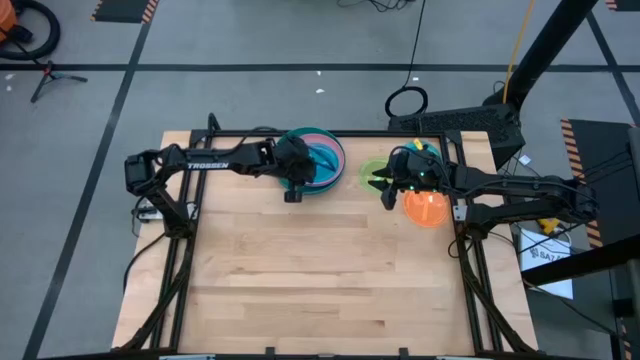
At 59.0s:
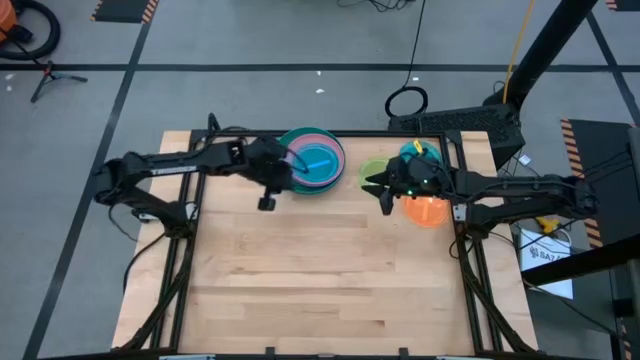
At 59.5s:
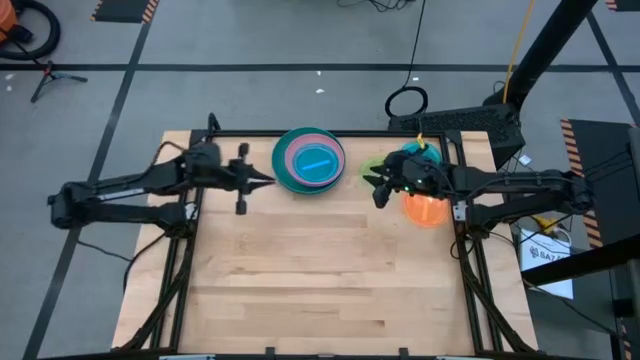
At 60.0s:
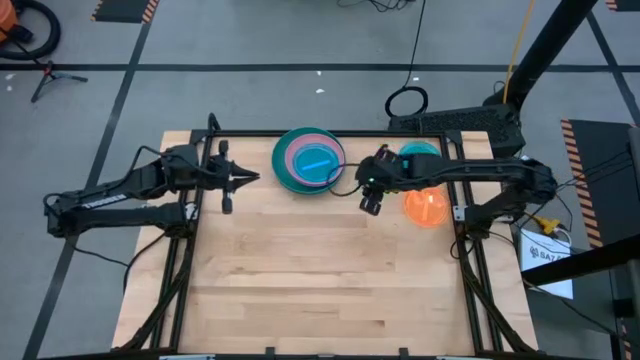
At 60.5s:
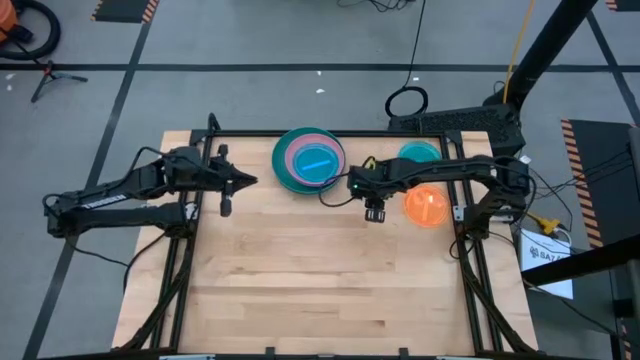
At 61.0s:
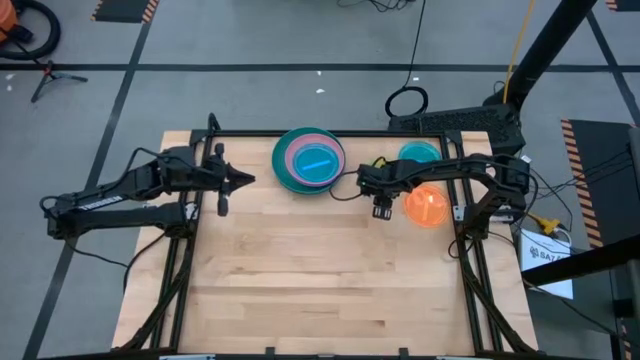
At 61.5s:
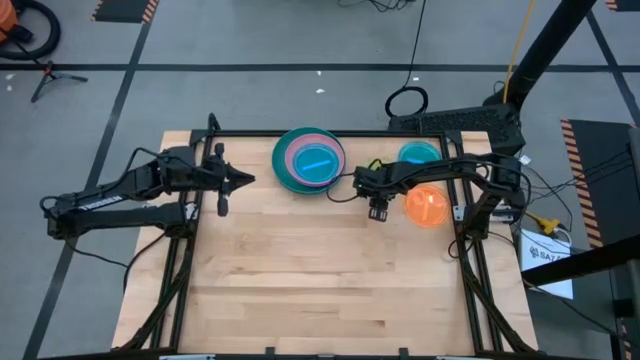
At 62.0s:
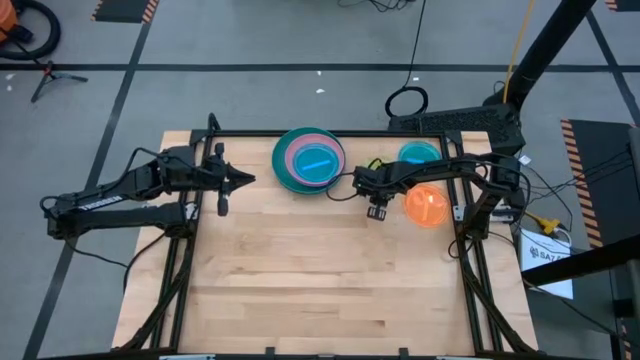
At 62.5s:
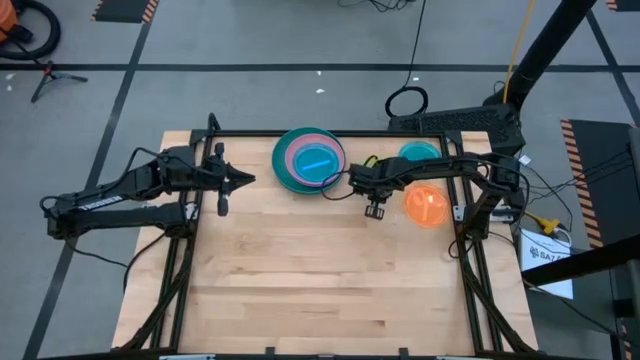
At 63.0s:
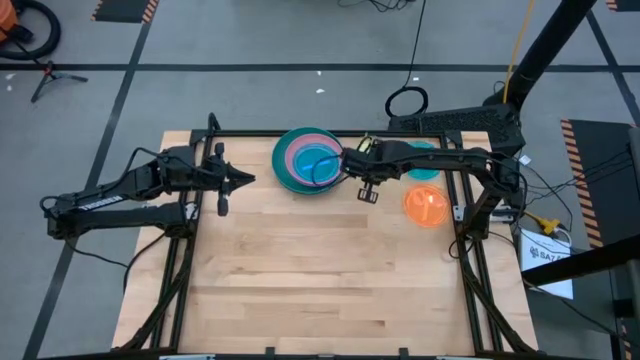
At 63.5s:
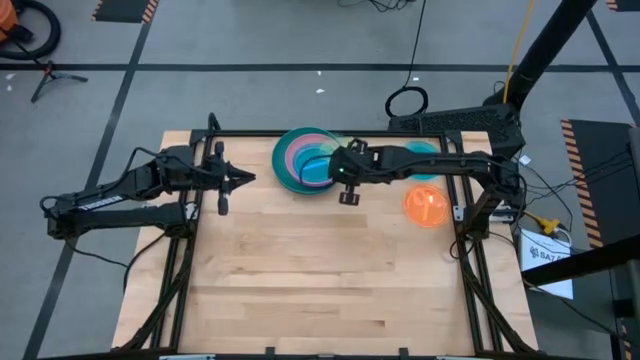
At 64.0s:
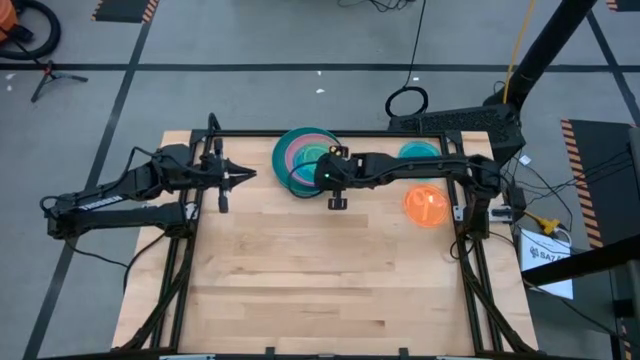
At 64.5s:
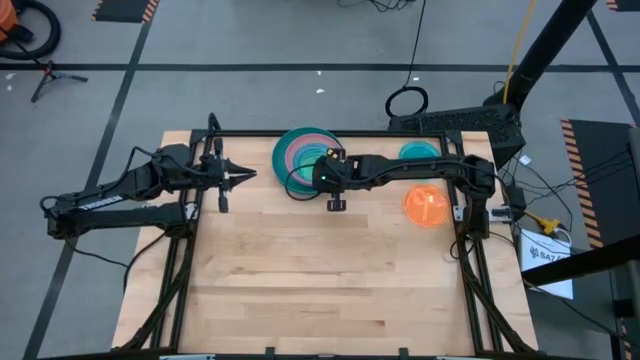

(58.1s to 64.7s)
Task: Stack plastic plates
Stack the green plate on top of the light blue plate

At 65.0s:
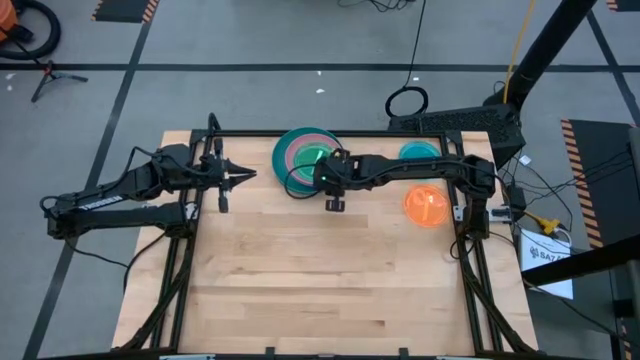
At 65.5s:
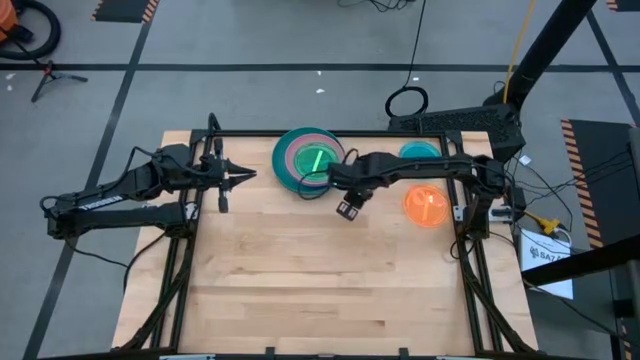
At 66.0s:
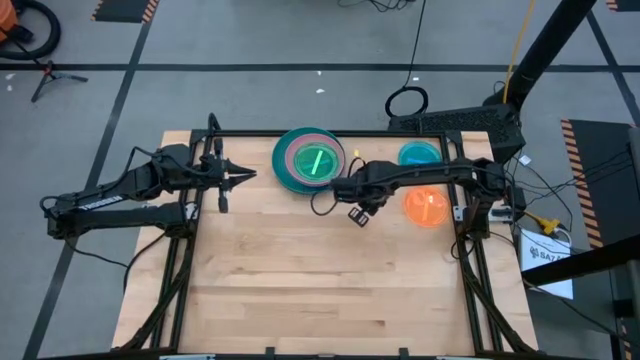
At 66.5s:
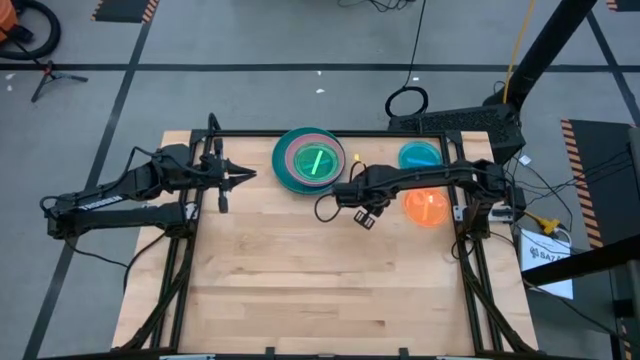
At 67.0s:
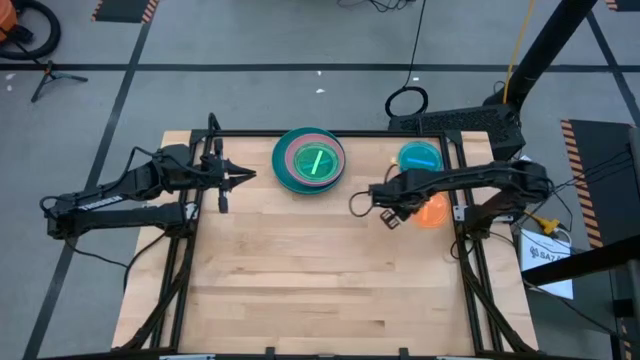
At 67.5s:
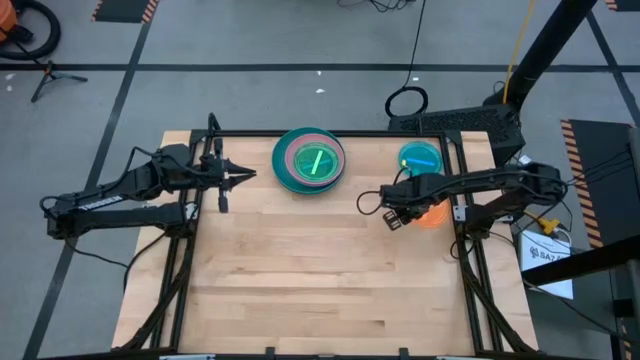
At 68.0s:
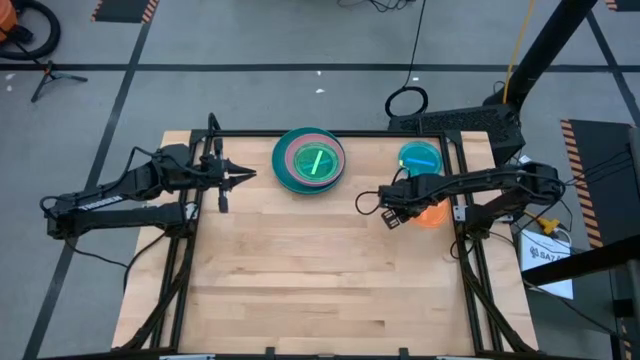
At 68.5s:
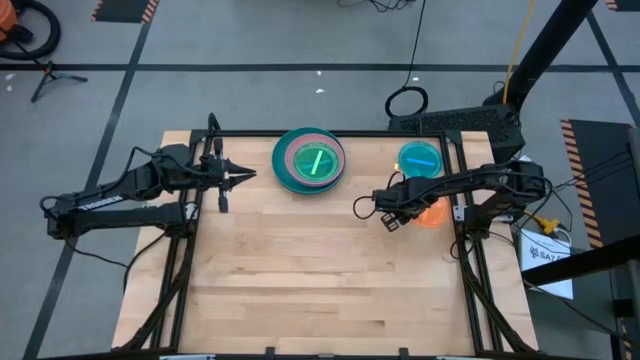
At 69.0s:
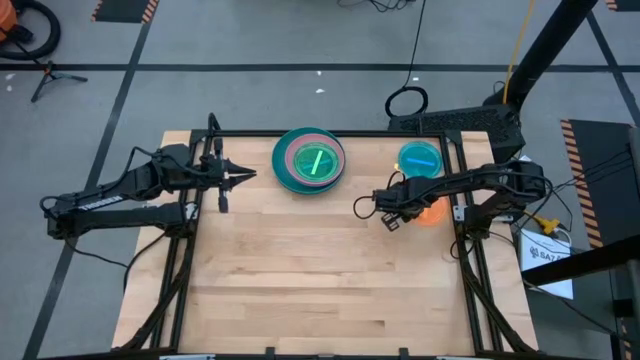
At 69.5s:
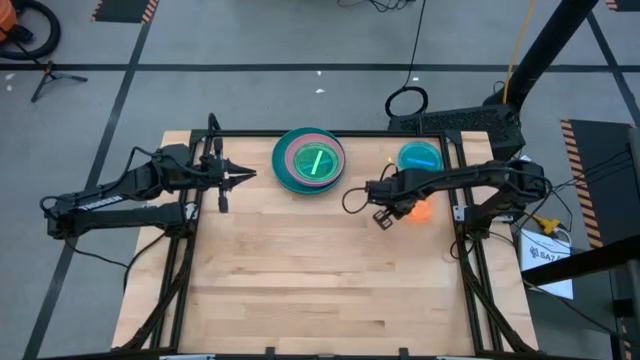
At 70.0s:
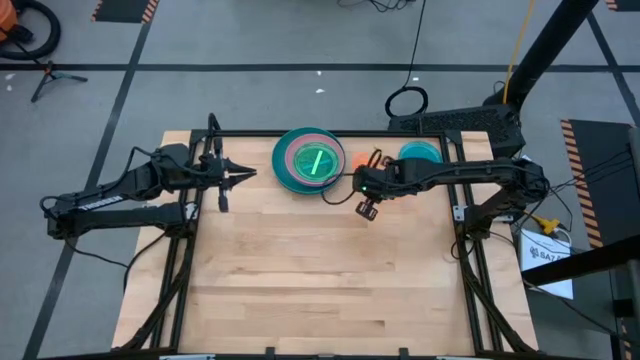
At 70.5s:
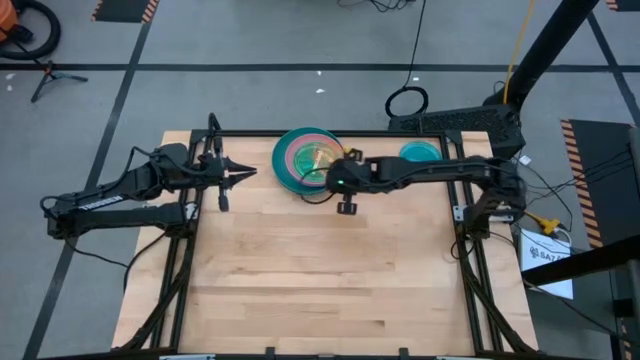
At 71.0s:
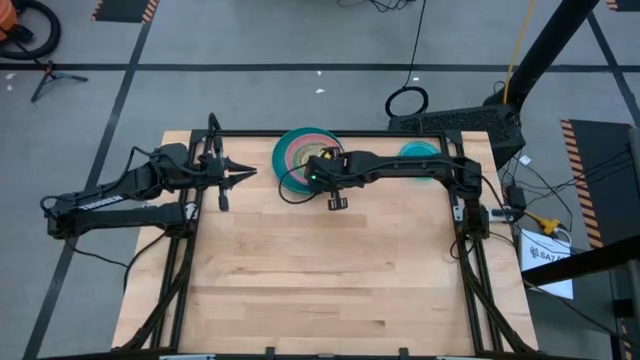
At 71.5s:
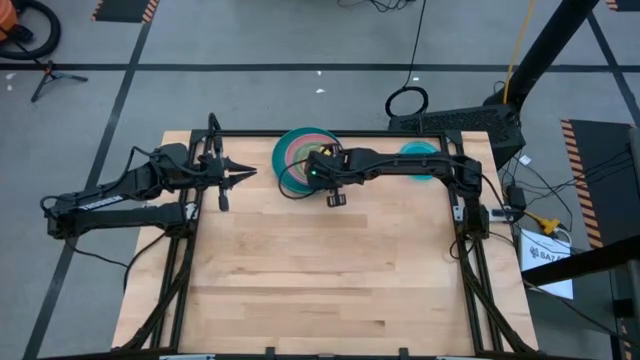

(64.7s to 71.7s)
Stack the orange plate on top of the green plate

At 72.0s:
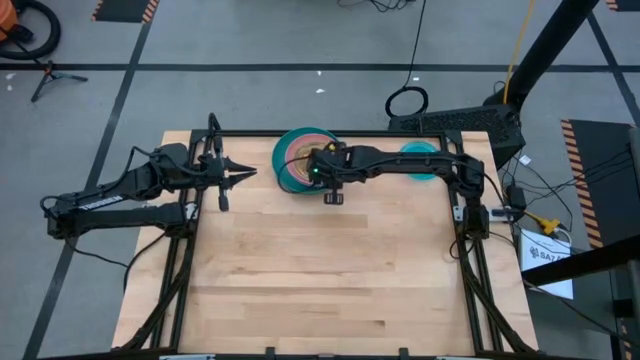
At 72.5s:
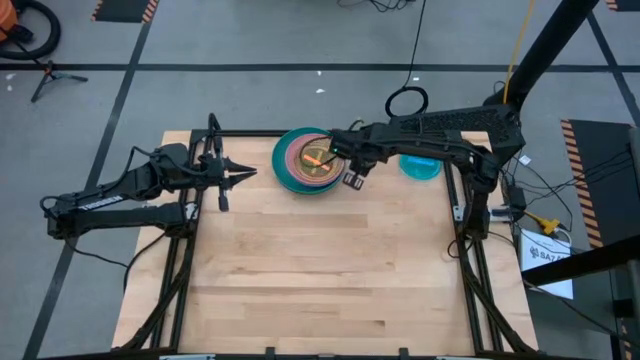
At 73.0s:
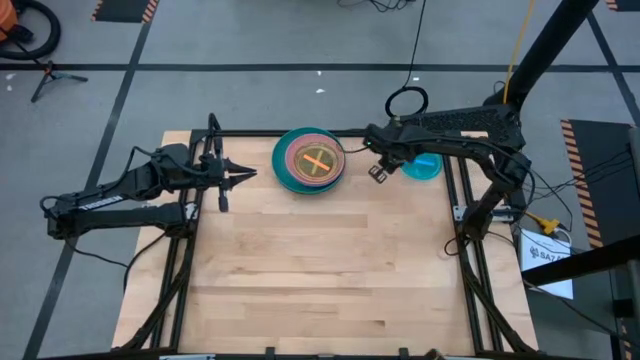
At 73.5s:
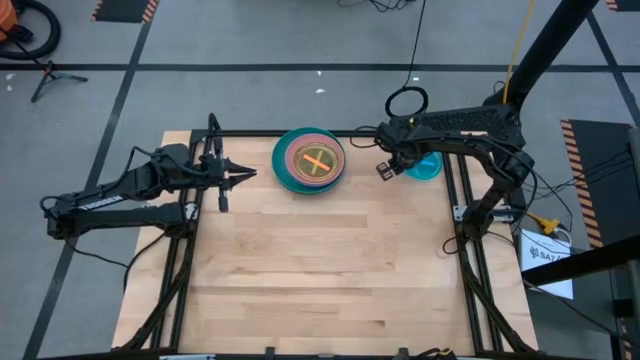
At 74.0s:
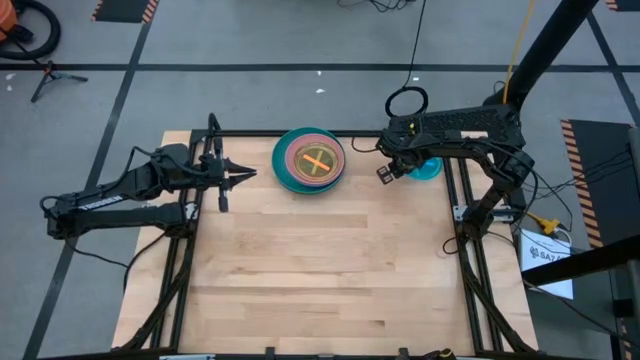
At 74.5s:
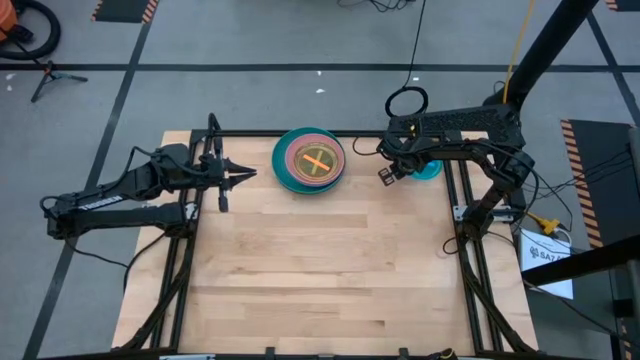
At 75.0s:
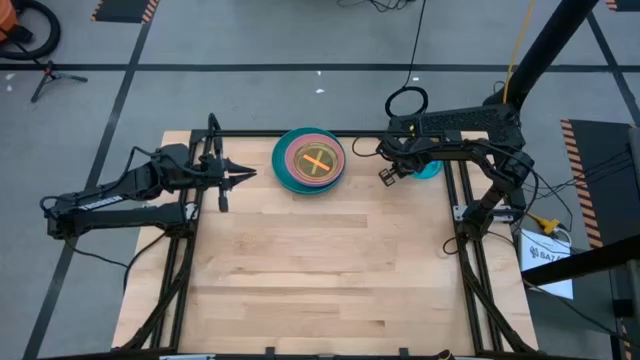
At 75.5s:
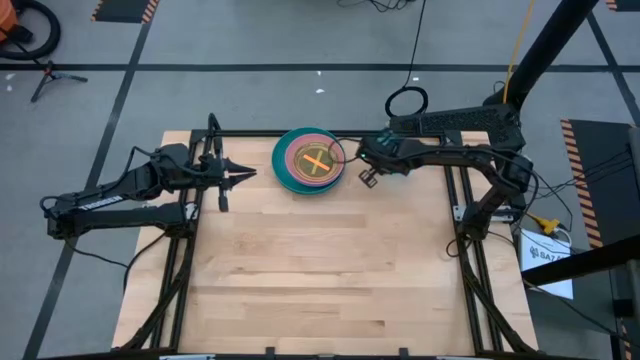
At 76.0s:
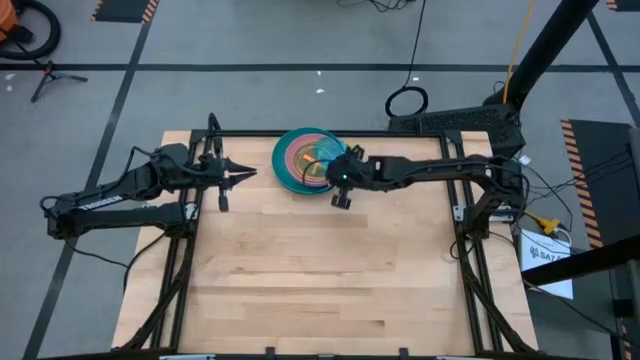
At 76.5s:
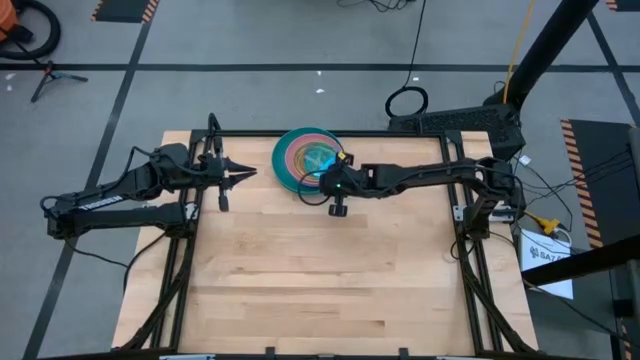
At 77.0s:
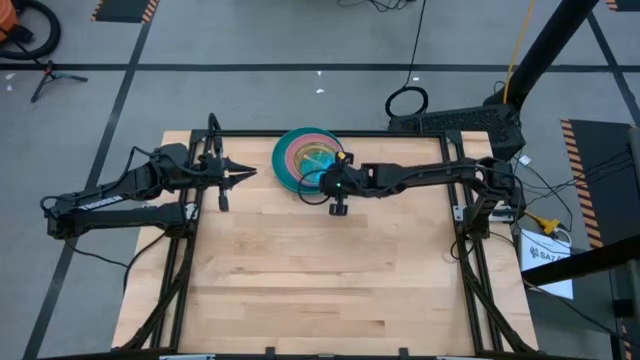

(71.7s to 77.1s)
Stack the light blue plate on top of the orange plate

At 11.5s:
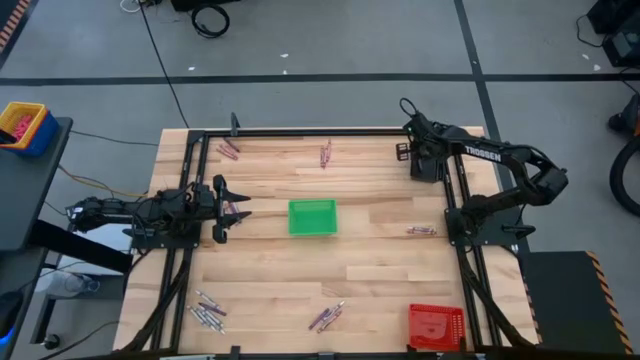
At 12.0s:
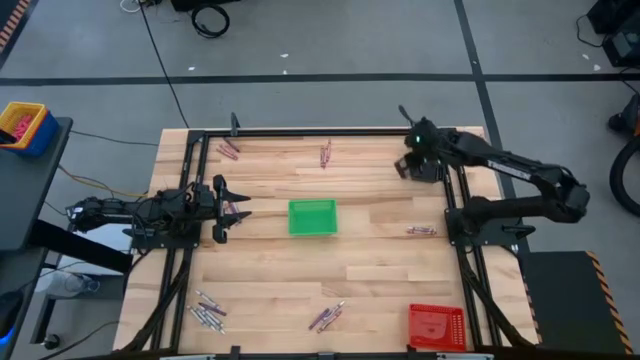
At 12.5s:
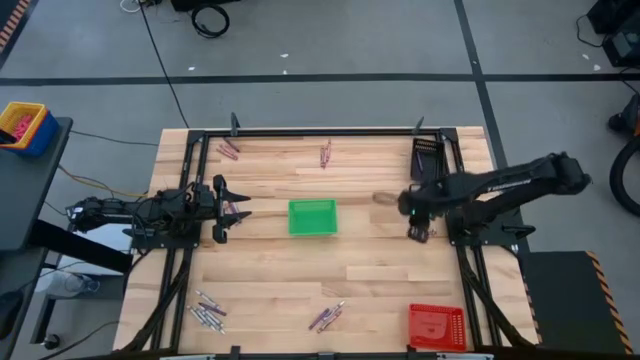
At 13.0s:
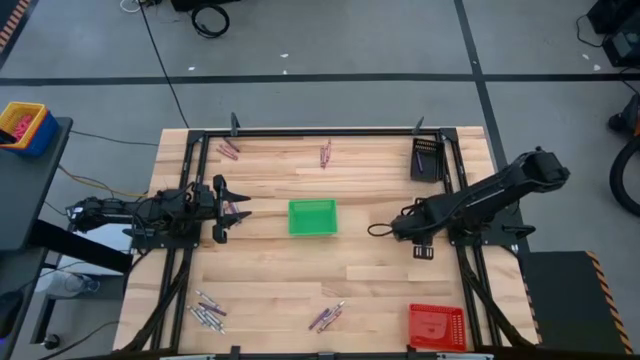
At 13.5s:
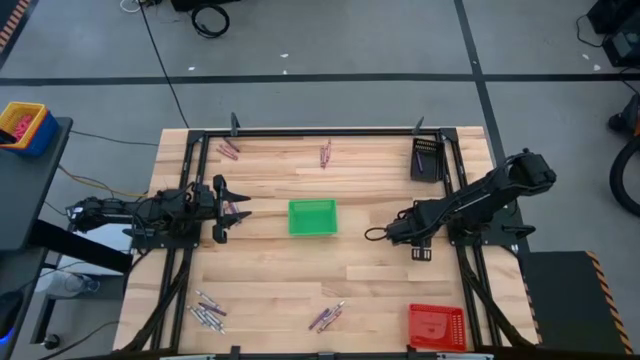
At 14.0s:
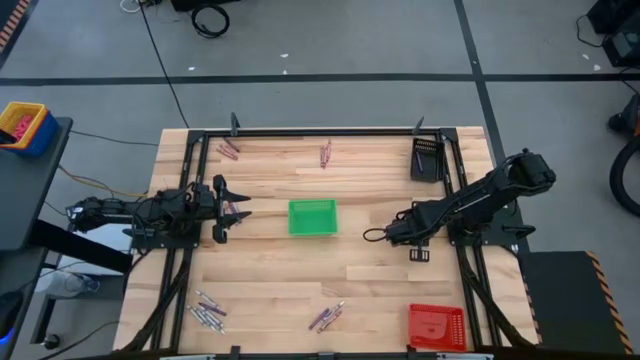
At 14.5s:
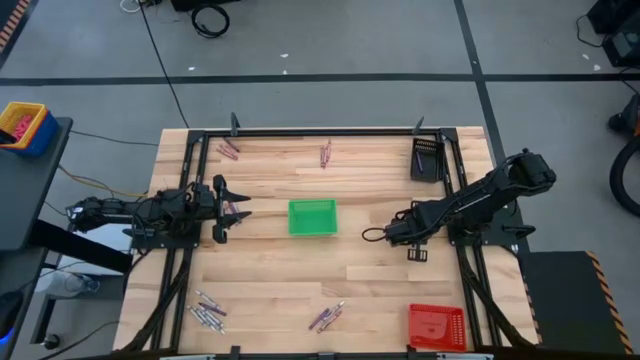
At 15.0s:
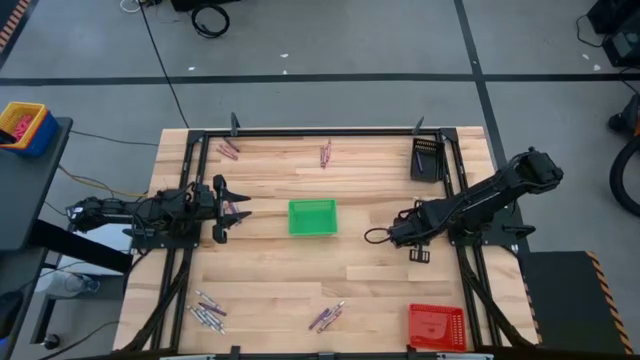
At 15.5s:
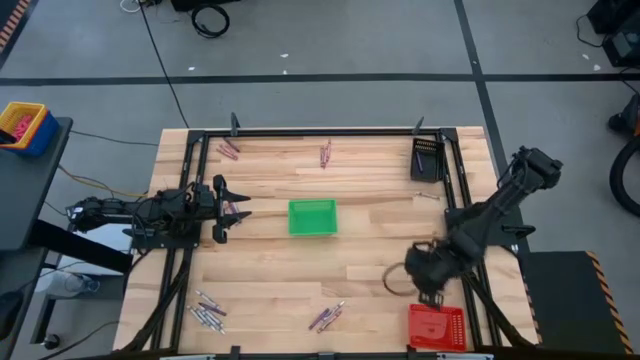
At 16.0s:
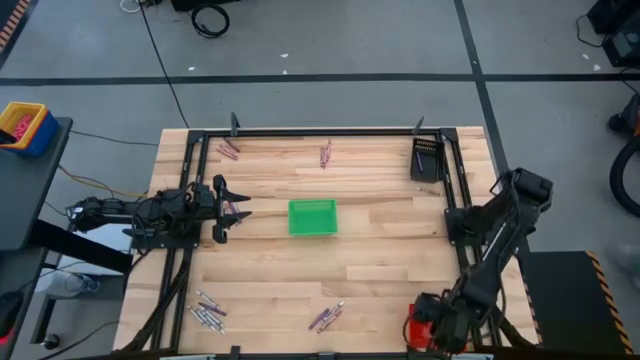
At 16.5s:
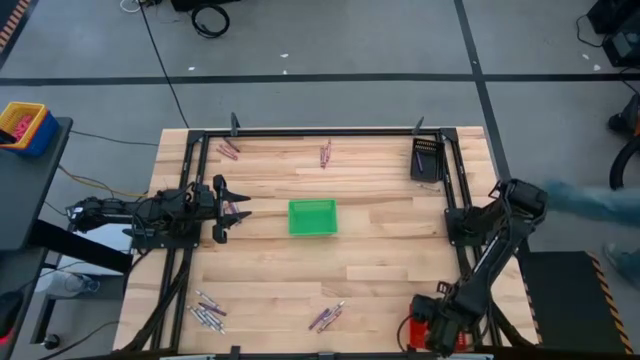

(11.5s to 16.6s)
Task: Sort crayons
Put the pink crayon into the red basket
